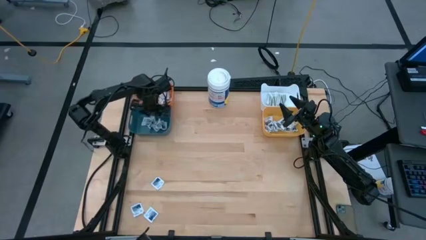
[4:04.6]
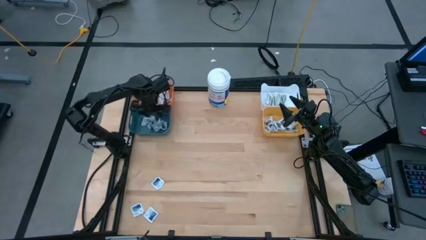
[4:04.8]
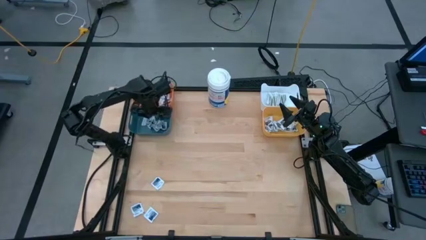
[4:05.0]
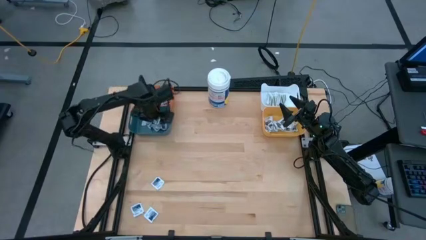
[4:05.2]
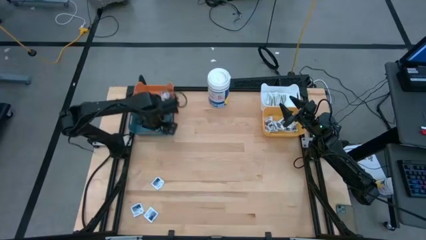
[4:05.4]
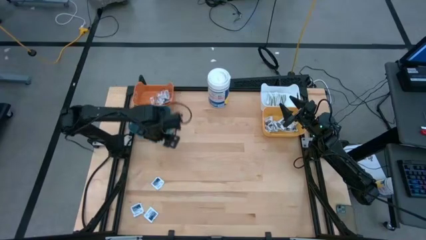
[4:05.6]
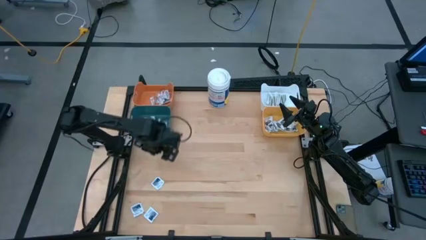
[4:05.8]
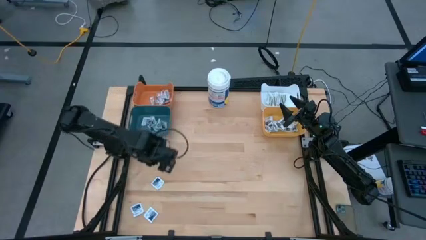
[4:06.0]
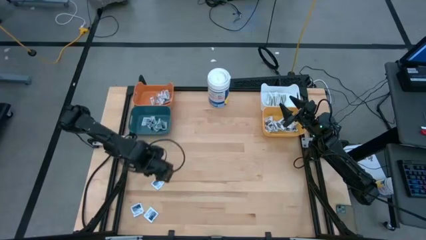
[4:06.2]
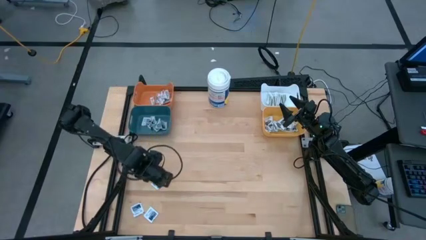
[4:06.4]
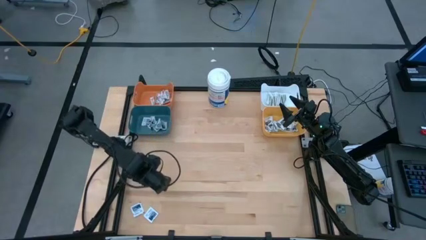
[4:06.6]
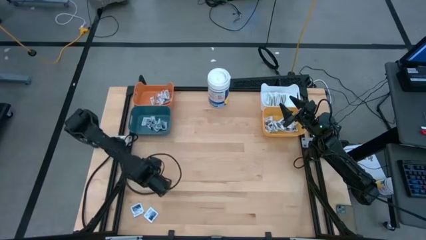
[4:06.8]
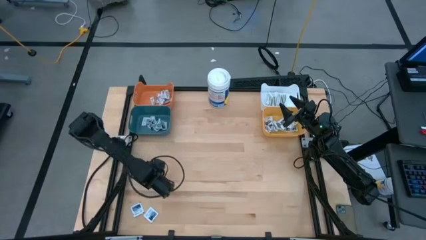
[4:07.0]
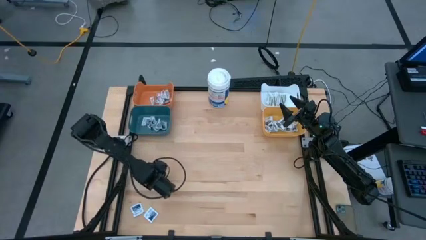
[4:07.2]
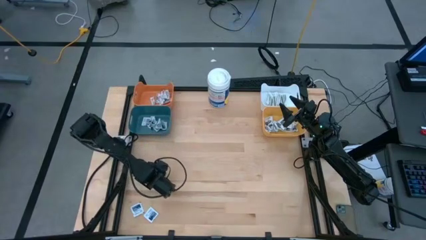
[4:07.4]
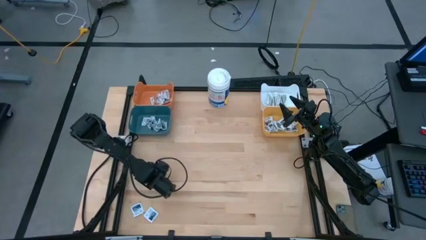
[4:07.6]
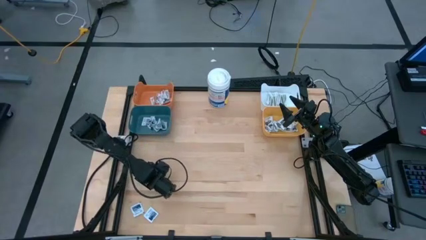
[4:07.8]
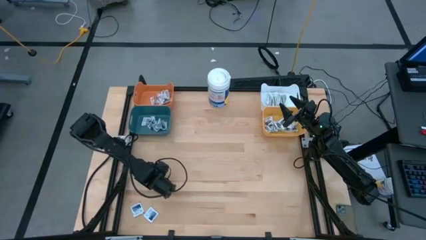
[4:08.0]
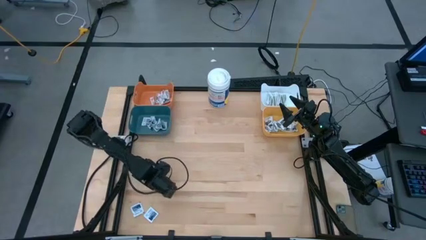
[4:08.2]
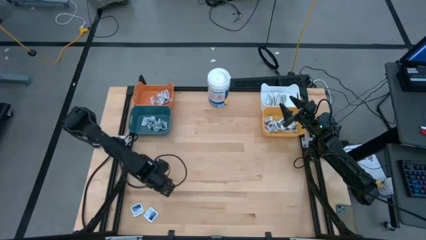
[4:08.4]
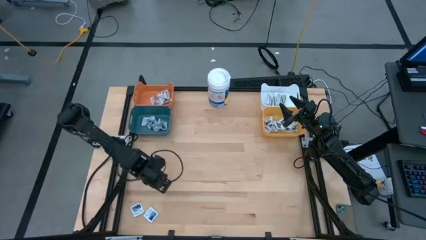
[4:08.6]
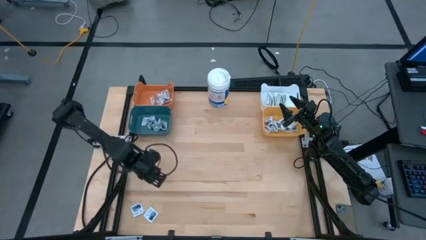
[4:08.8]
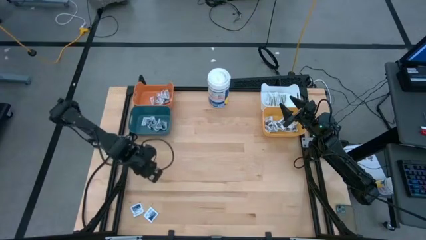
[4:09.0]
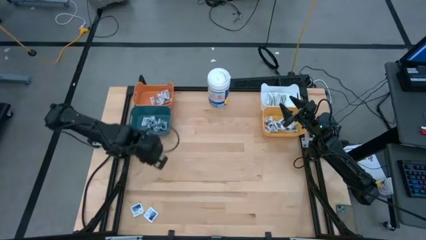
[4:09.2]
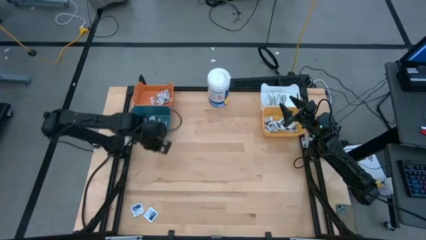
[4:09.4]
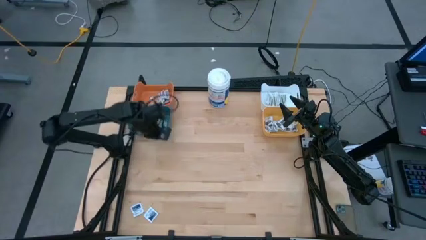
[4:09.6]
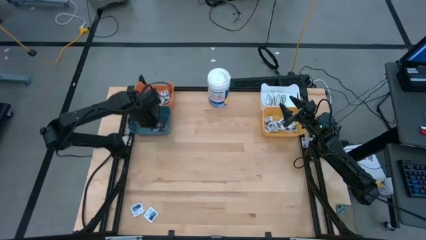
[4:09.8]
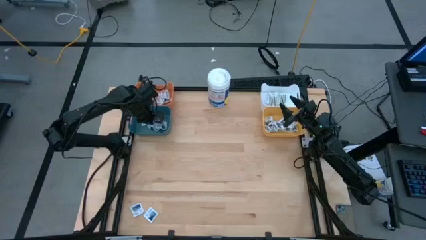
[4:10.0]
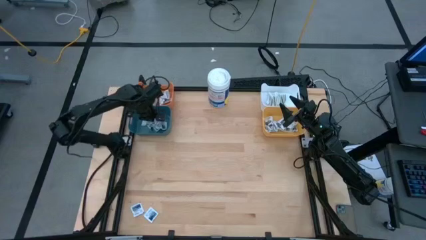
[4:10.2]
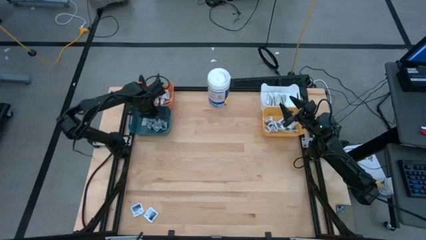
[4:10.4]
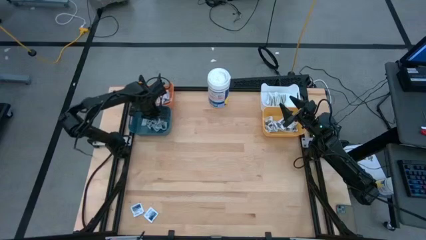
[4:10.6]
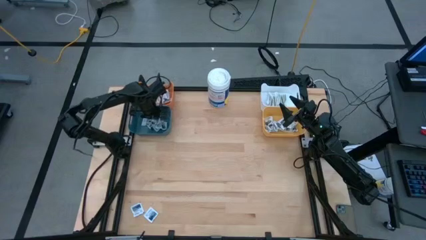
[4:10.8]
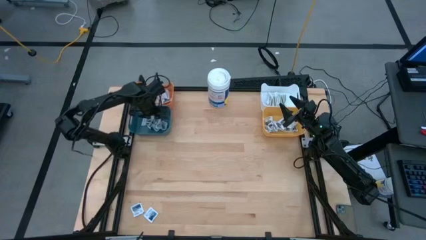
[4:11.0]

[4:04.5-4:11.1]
Task: Pick & Place First Aid Supplies
Put the blue pad into the blue bin

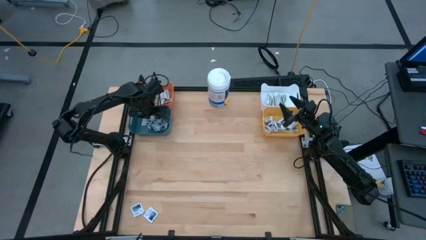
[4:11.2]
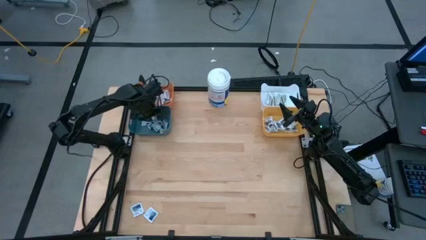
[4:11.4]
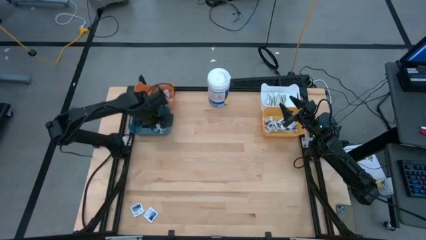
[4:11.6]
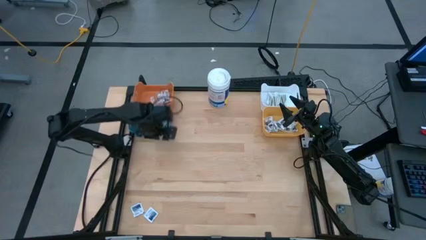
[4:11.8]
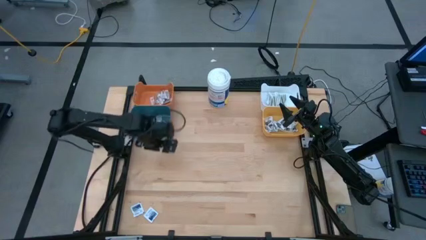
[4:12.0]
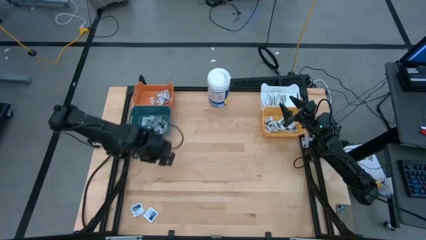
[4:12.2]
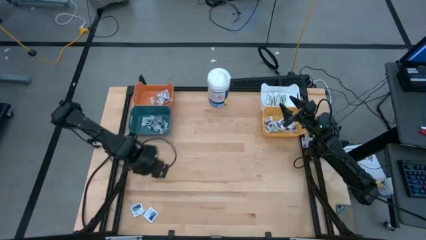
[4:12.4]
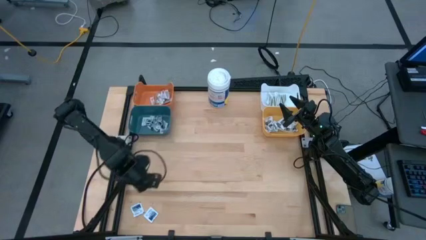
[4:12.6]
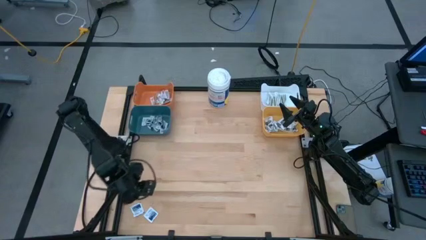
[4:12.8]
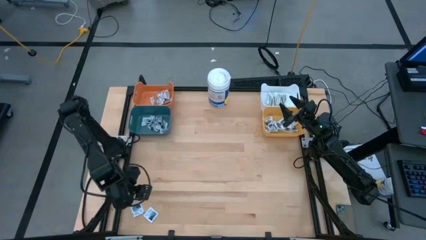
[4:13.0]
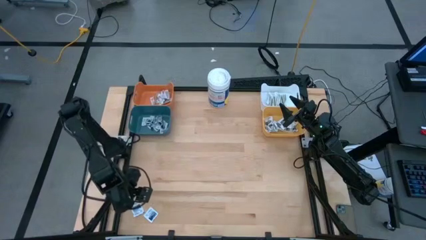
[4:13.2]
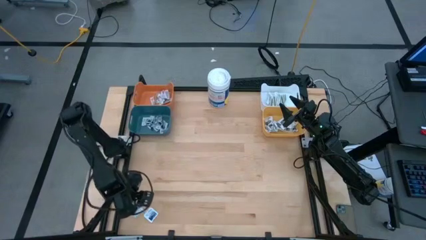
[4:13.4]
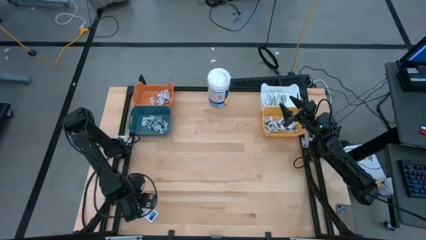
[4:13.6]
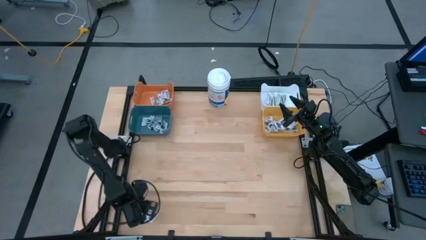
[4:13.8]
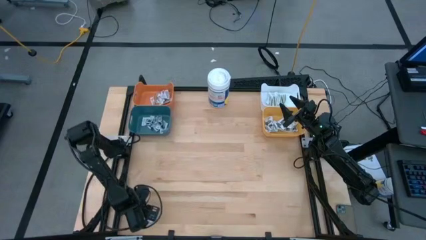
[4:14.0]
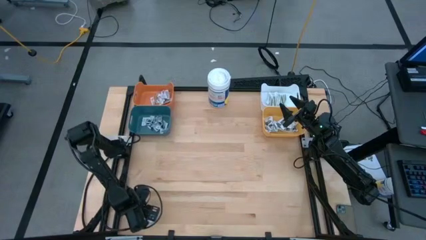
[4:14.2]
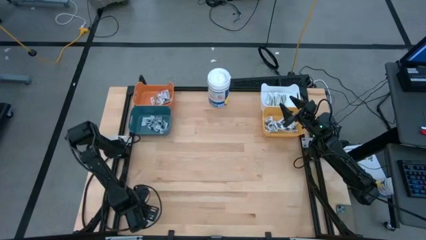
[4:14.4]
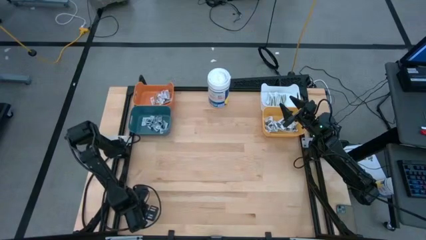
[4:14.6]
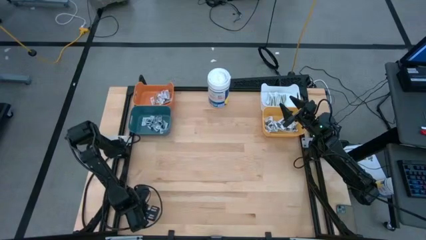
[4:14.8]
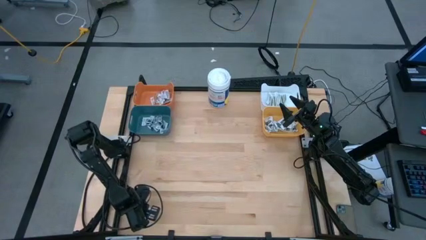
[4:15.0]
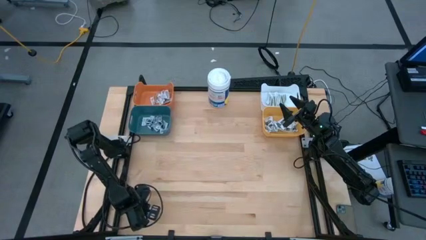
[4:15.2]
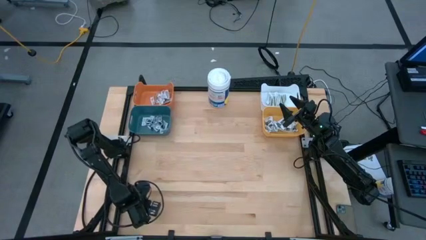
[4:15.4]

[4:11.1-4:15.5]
Put the blue pad into the blue bin

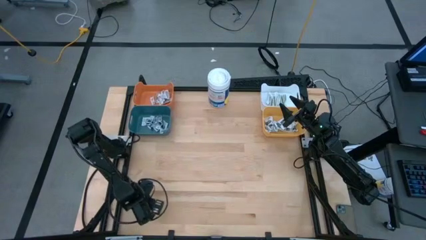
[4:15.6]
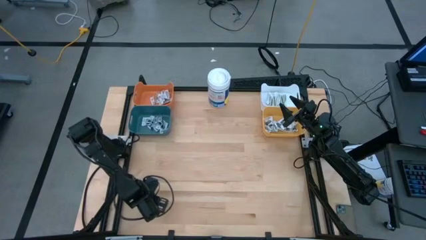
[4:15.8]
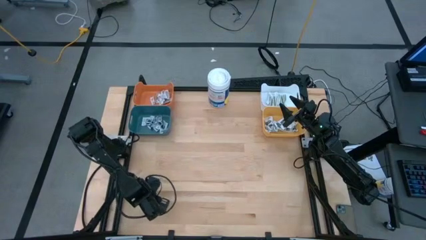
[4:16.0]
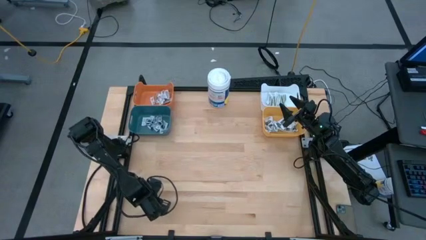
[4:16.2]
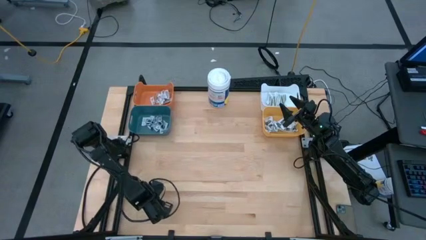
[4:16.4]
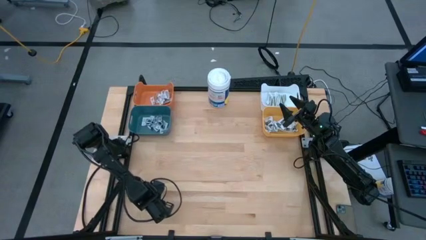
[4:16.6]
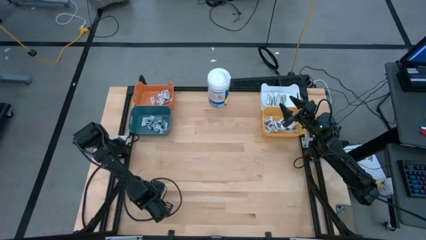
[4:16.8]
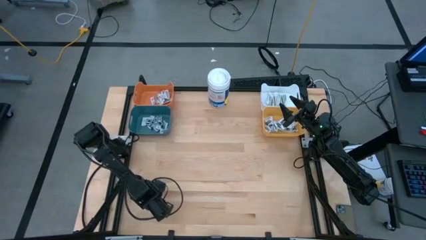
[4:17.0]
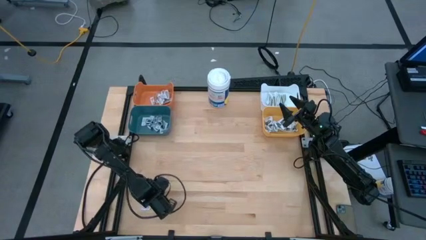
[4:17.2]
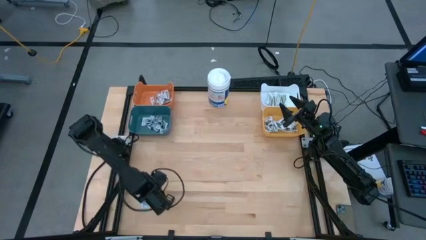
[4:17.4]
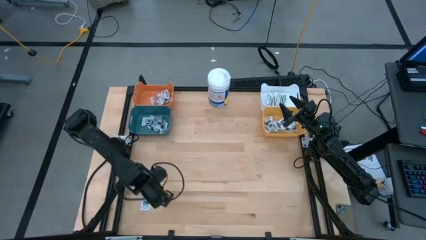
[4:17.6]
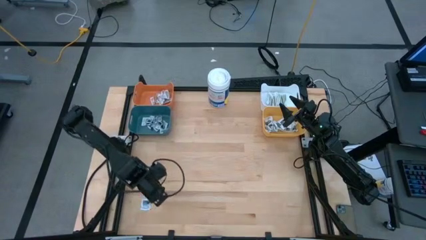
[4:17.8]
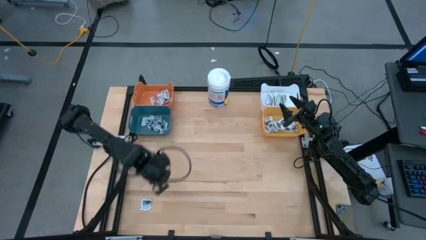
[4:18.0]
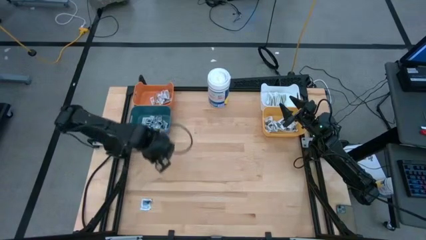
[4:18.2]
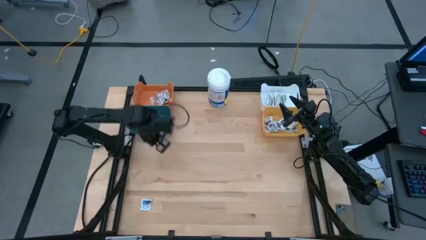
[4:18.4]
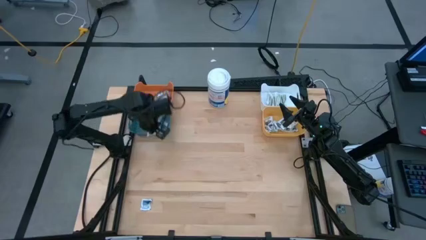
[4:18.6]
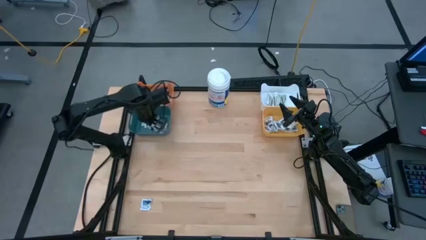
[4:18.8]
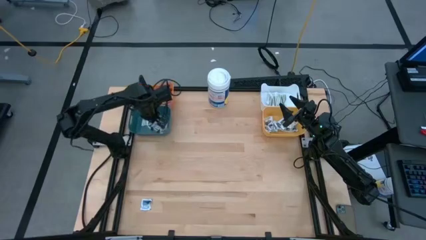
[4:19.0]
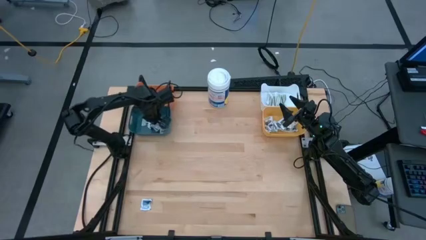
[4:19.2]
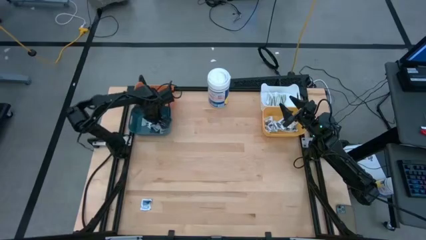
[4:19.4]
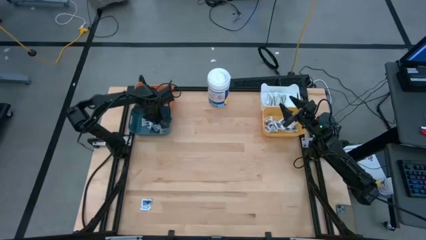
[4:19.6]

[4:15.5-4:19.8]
Put the blue pad into the blue bin

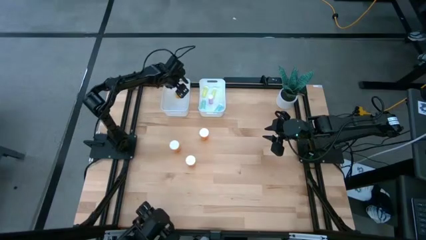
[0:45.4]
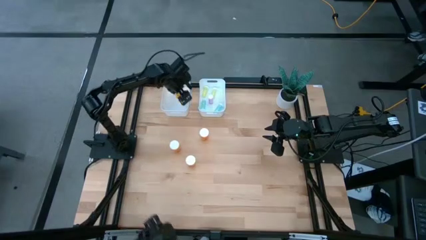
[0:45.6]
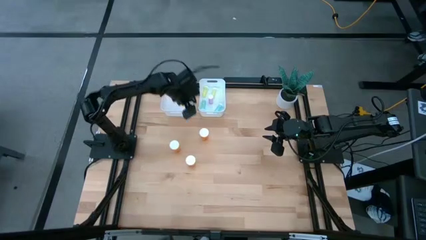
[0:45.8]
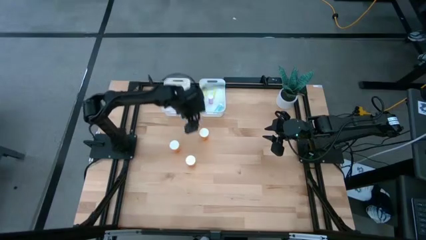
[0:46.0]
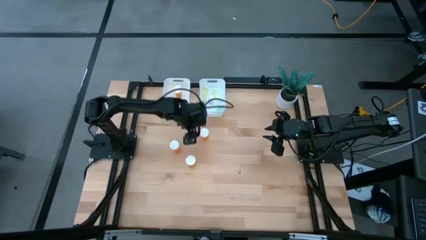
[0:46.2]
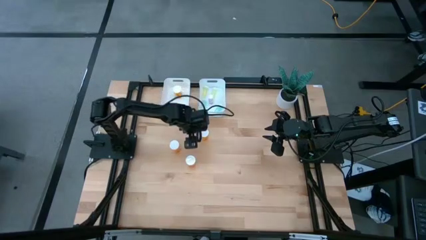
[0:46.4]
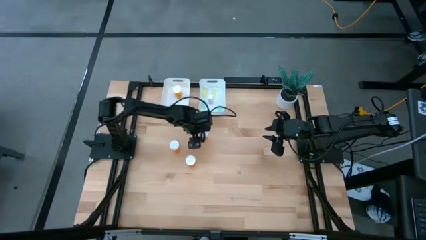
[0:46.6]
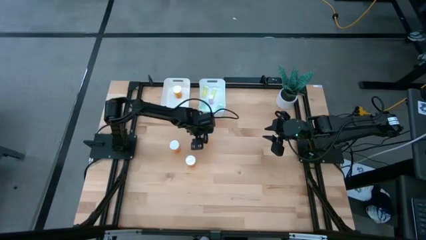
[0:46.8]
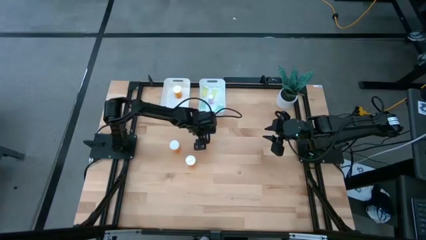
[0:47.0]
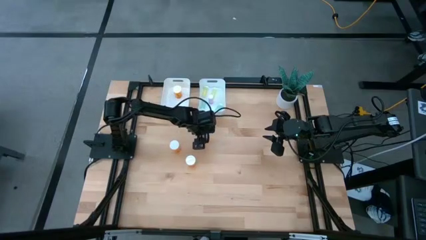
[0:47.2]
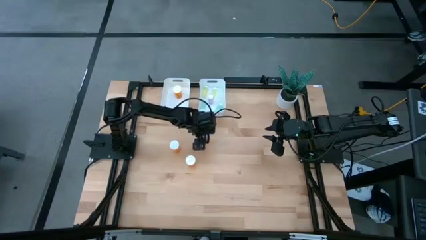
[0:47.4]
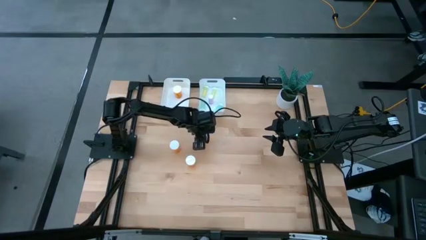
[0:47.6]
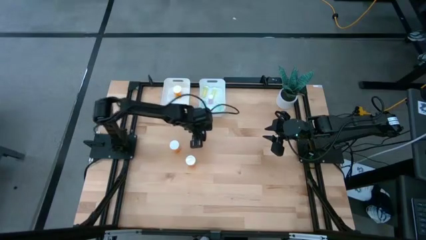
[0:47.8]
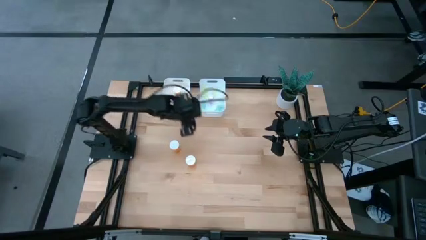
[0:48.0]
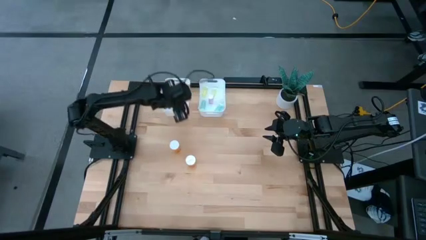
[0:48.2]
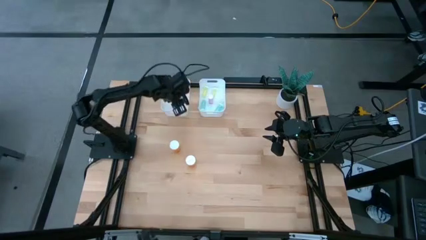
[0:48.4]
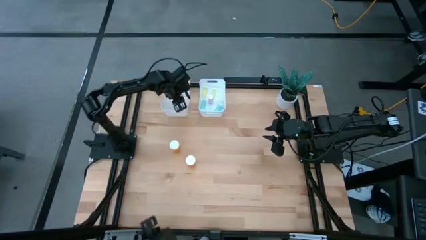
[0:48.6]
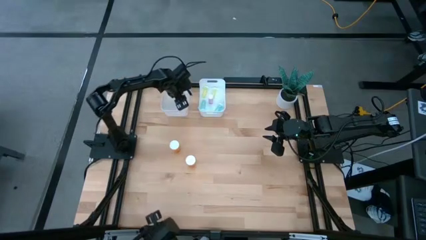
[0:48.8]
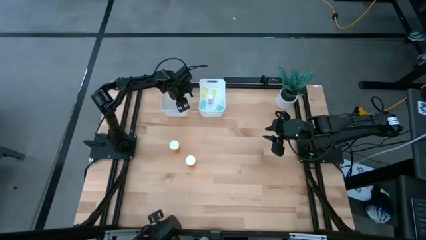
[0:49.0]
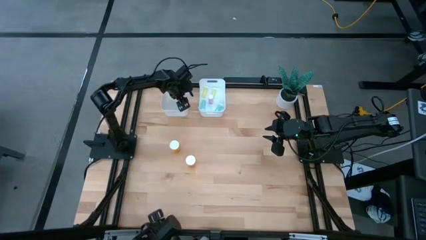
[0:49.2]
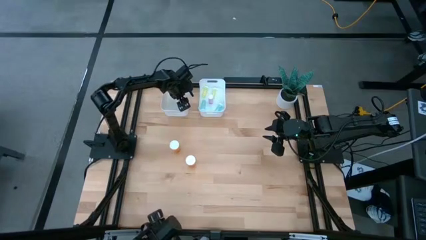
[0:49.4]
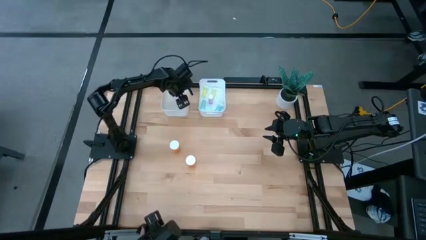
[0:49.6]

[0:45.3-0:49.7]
Task: Pick and place medicine bottles into bin by pill shape (circle, oval)
Put the large orange pill bottle into the left white bin
